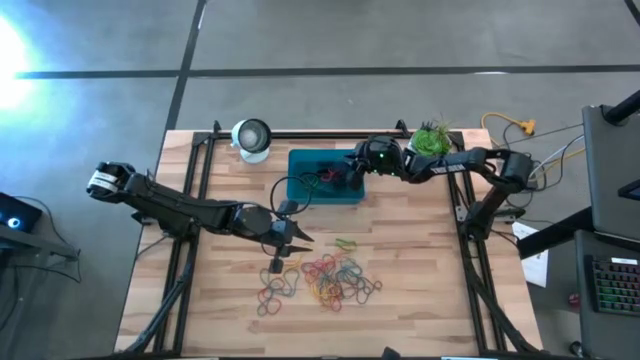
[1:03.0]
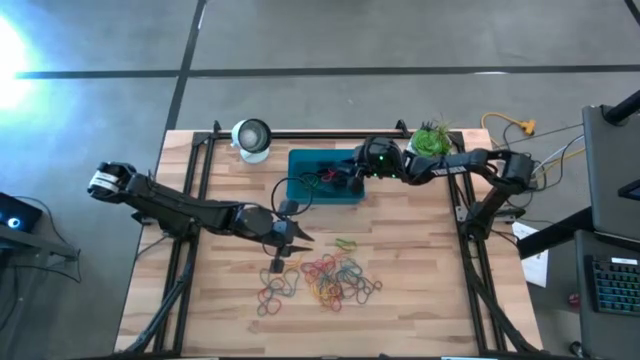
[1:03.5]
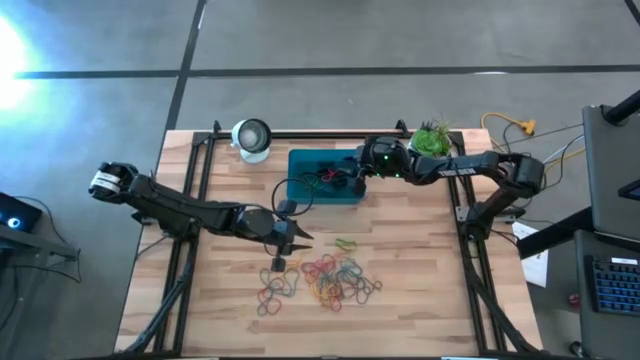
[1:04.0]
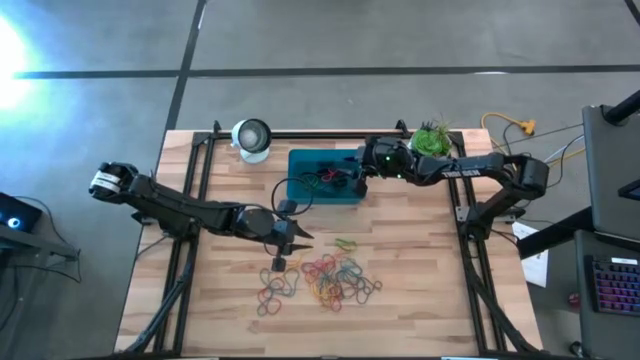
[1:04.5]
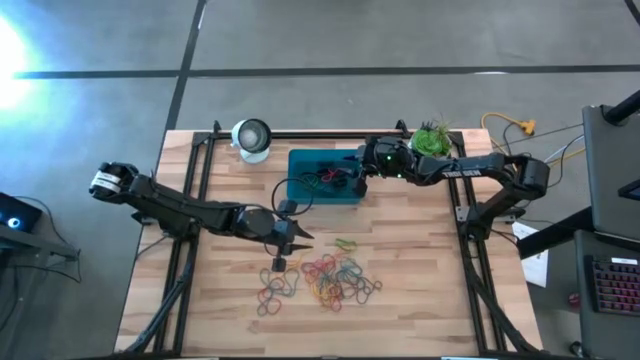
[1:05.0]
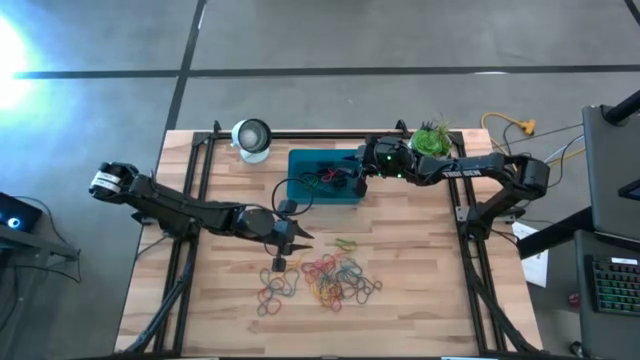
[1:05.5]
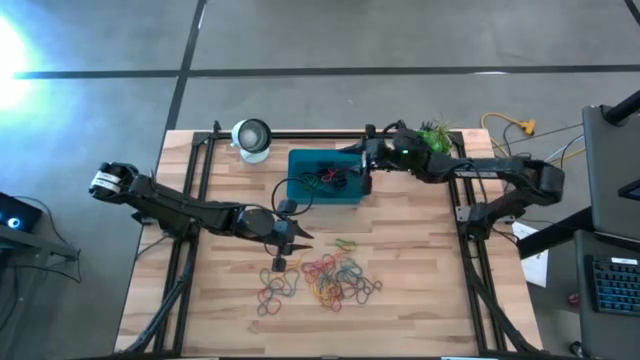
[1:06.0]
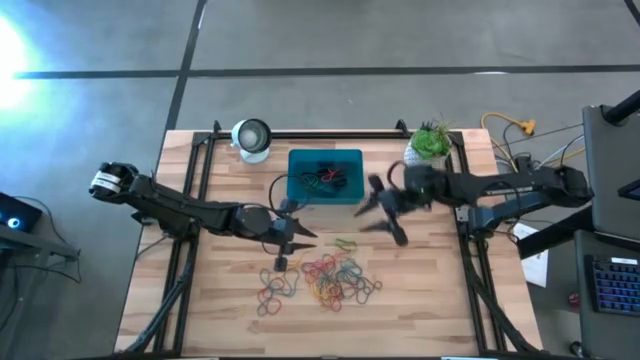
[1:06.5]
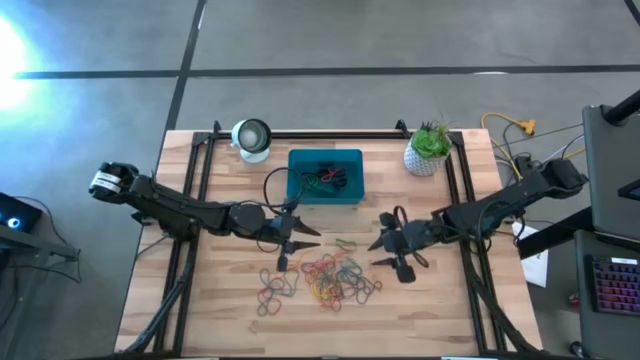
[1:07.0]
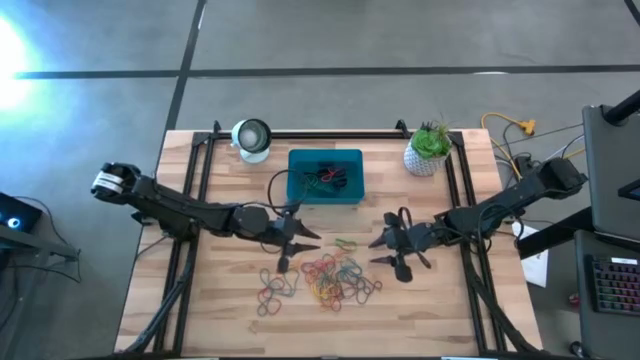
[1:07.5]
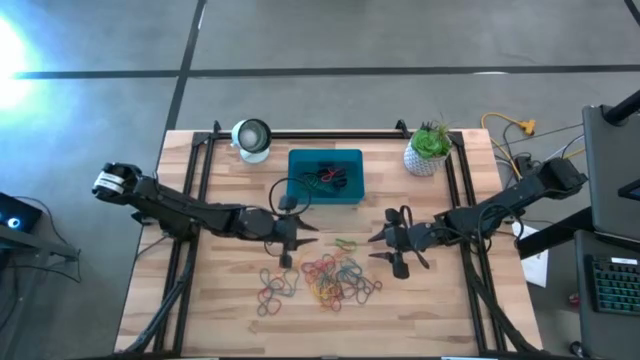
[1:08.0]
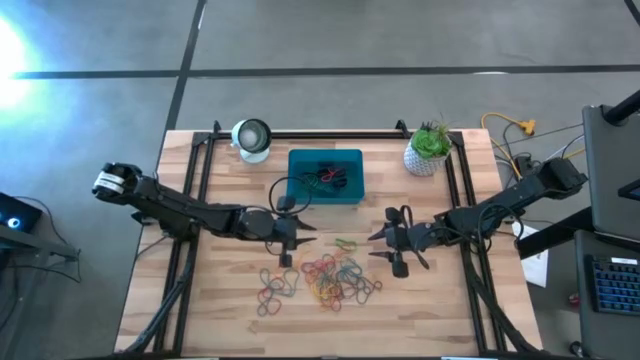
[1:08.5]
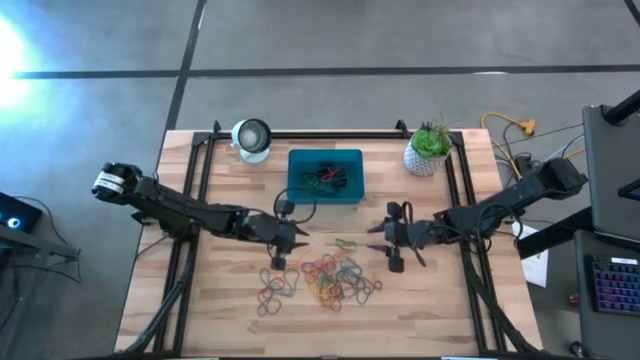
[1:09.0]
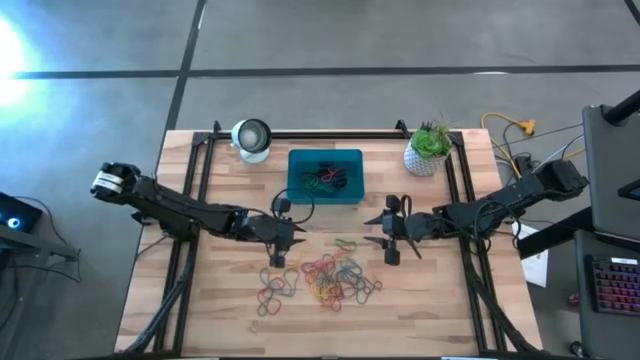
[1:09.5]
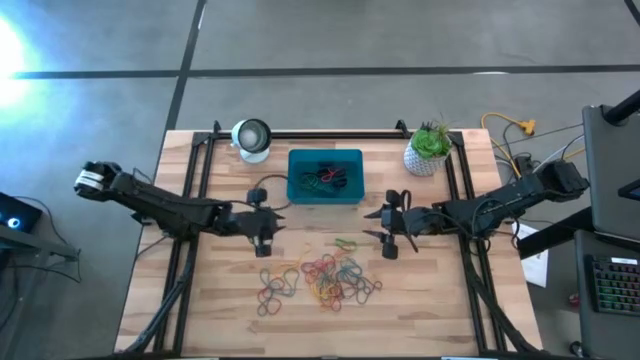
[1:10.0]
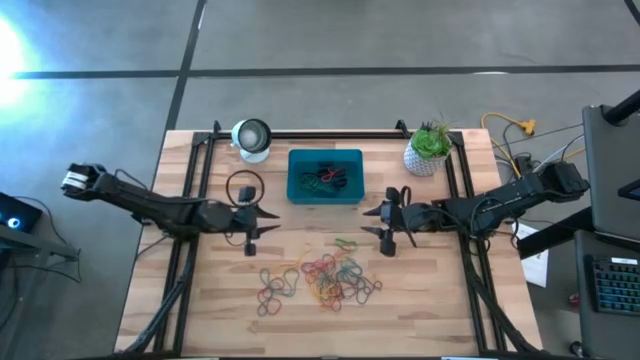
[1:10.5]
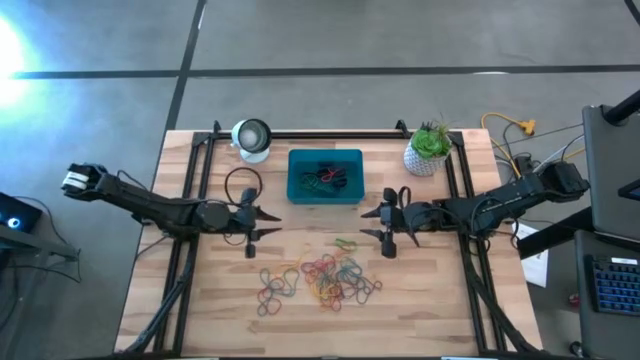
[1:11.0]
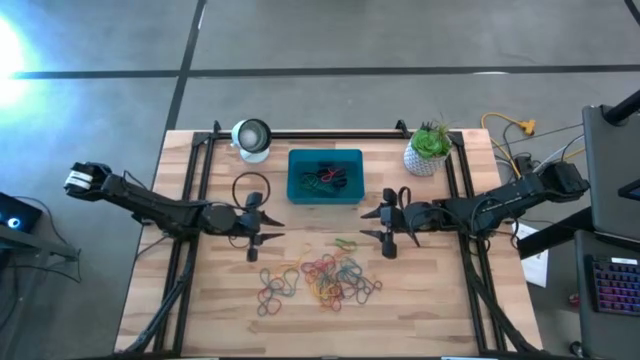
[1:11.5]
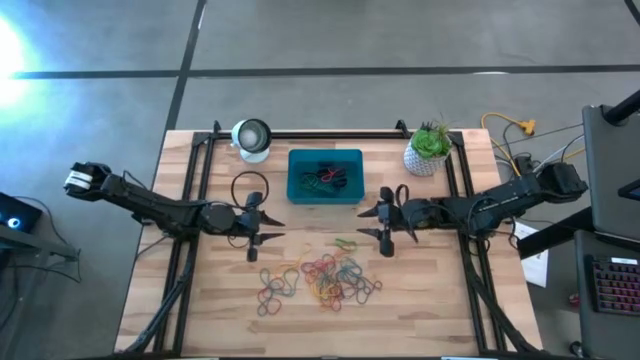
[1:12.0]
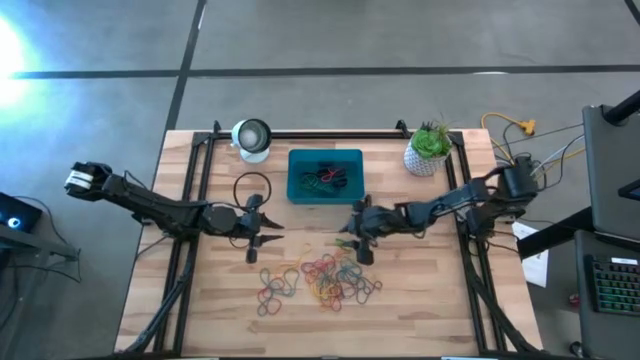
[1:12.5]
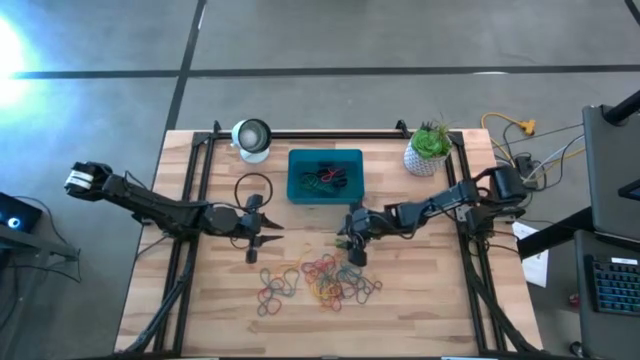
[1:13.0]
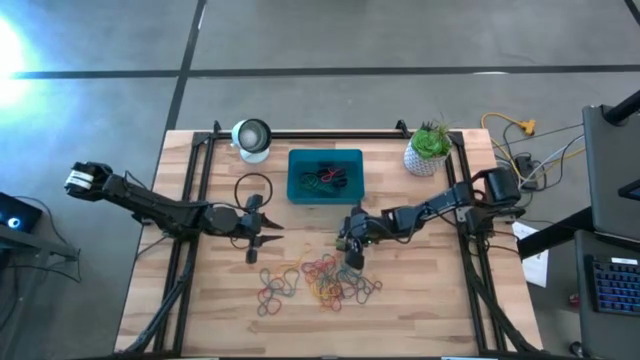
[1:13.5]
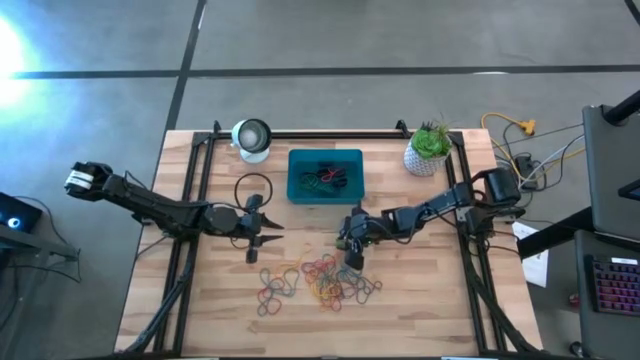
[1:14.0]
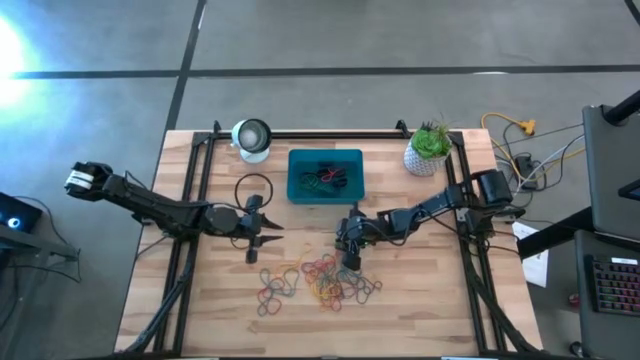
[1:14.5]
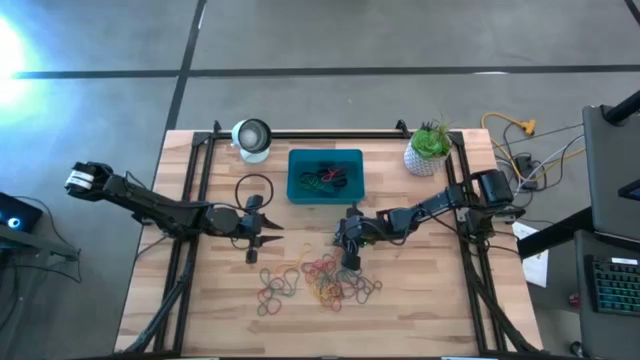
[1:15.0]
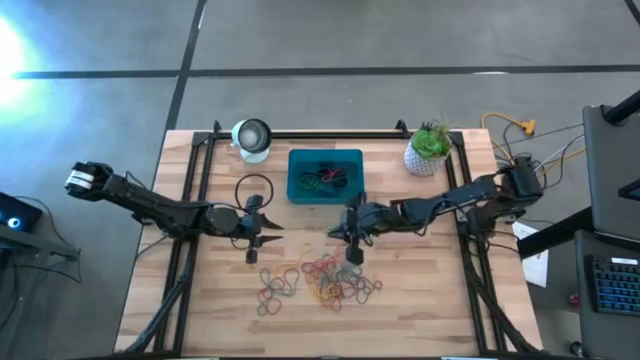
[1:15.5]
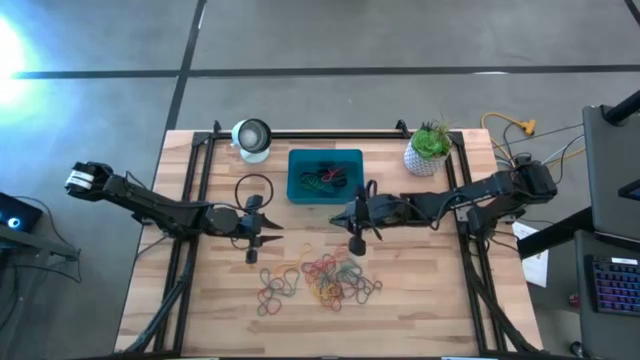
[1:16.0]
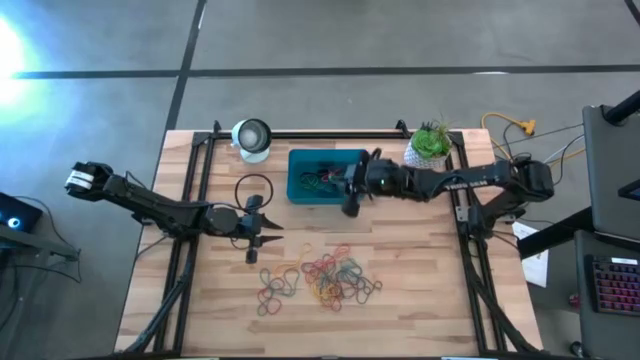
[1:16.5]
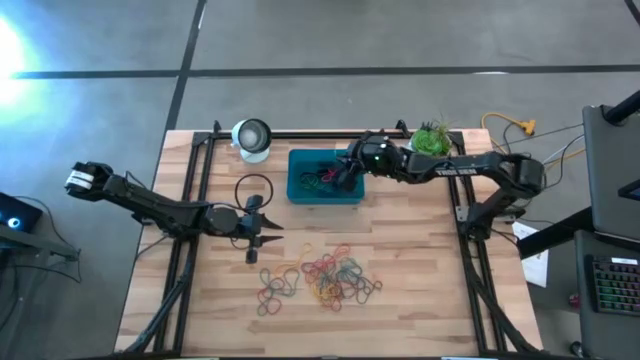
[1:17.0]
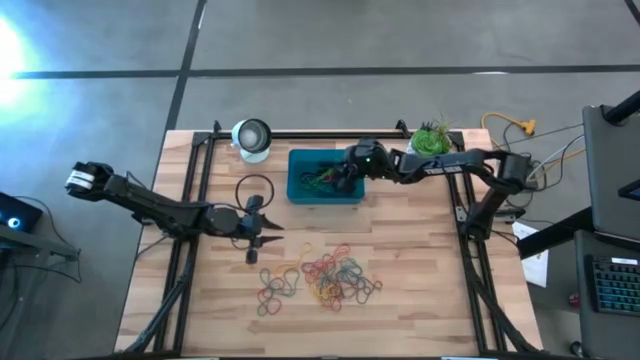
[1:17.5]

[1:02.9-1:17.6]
Task: Pick and place rubber bands into bin
Put the green rubber band into the bin

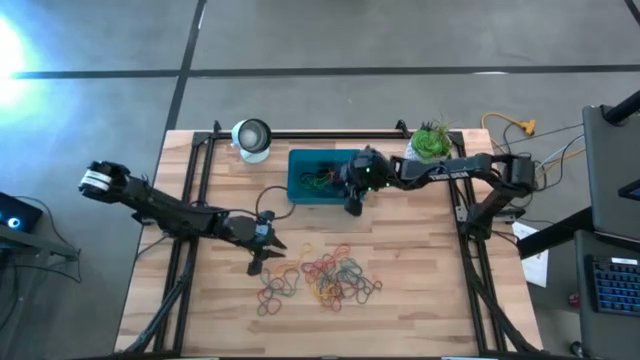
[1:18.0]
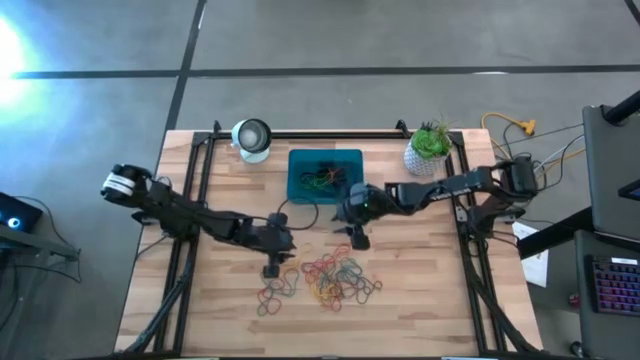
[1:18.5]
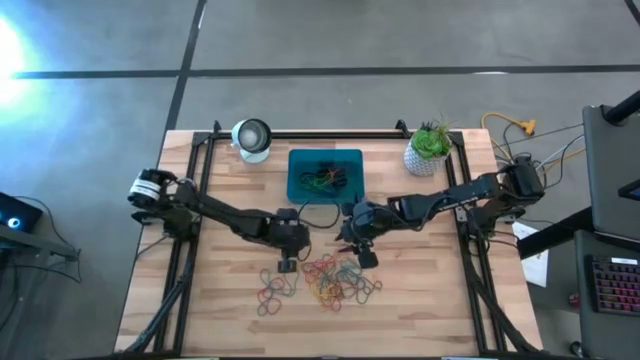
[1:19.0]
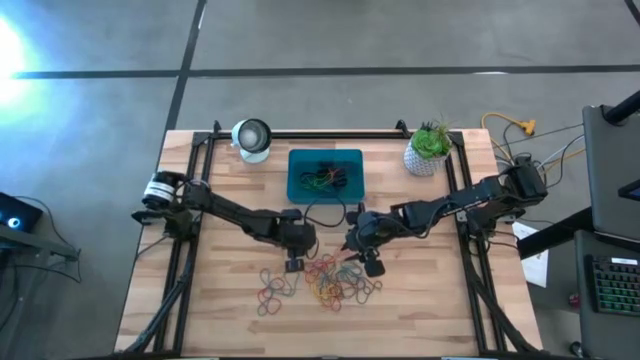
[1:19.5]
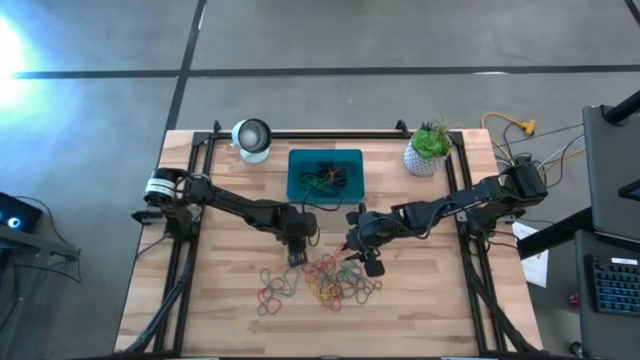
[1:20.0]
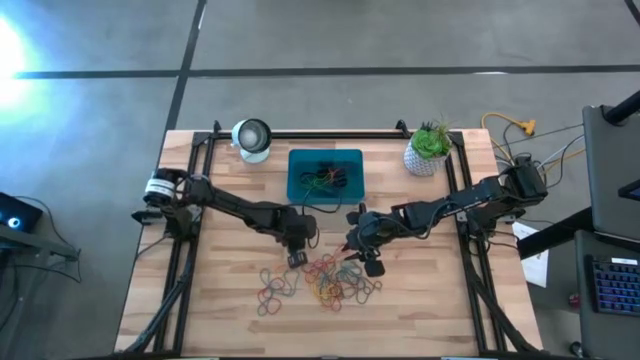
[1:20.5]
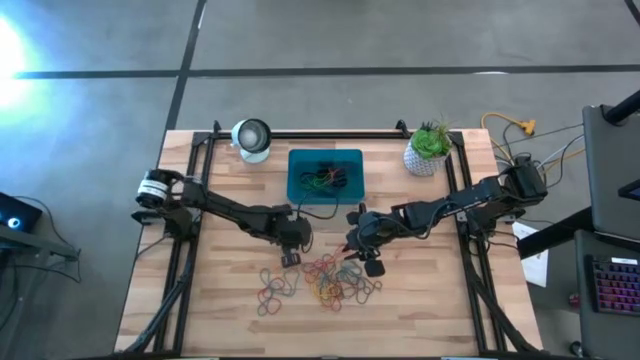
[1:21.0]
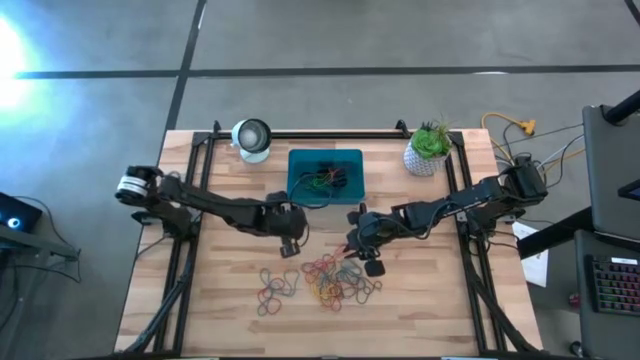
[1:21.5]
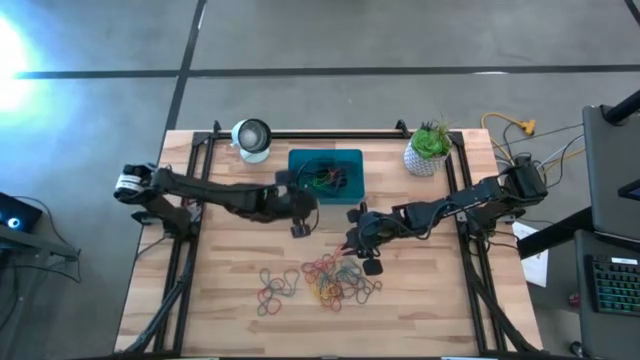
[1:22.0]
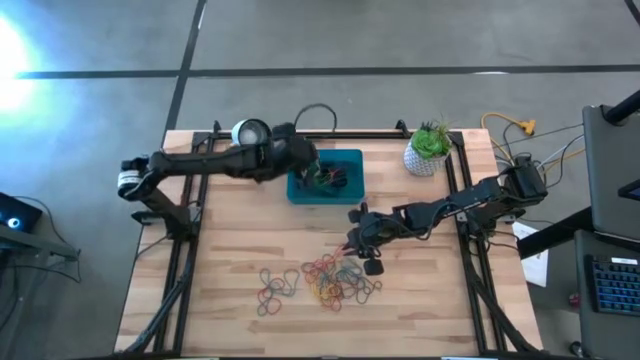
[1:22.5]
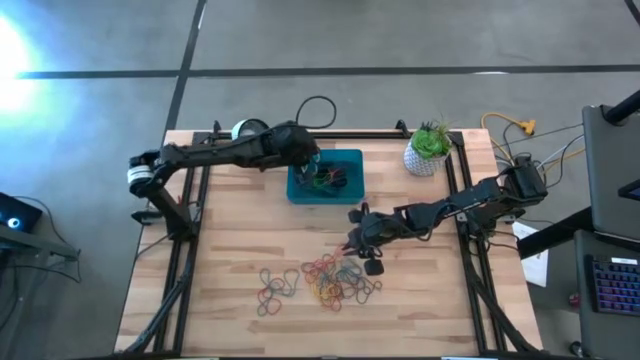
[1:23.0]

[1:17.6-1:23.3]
Put the yellow rubber band into the bin
